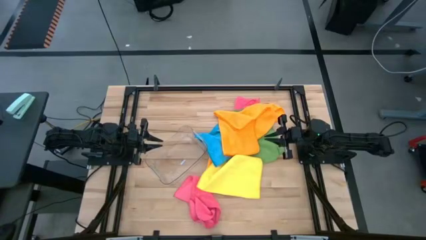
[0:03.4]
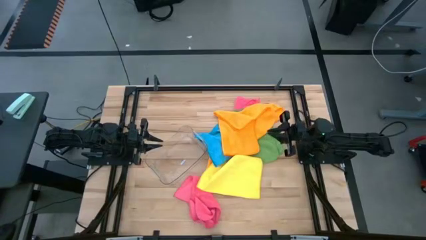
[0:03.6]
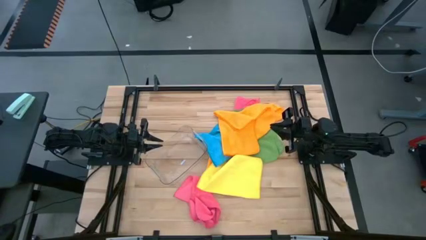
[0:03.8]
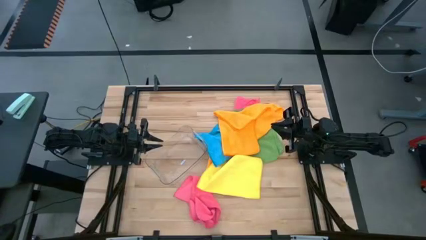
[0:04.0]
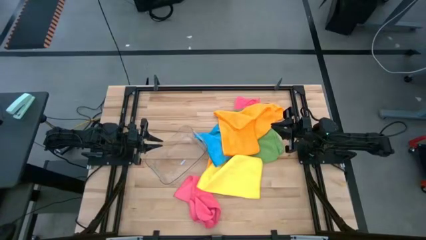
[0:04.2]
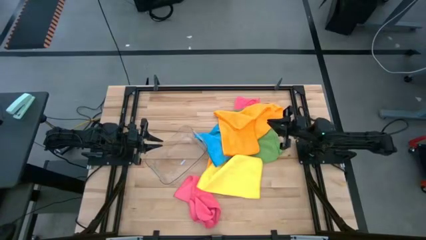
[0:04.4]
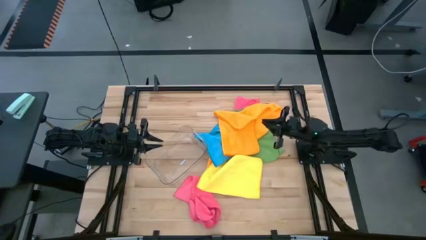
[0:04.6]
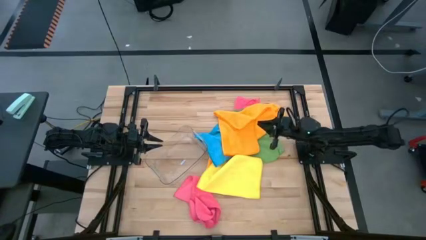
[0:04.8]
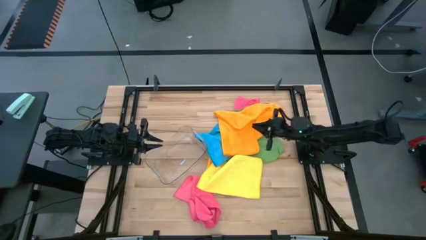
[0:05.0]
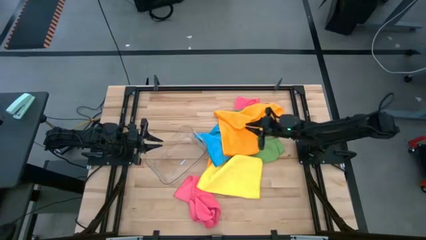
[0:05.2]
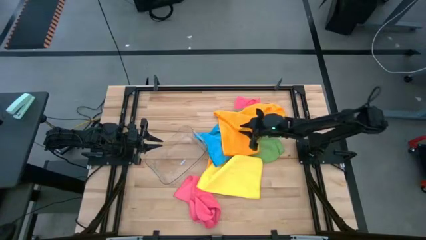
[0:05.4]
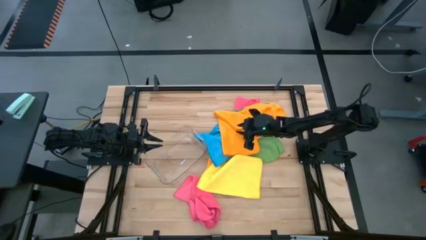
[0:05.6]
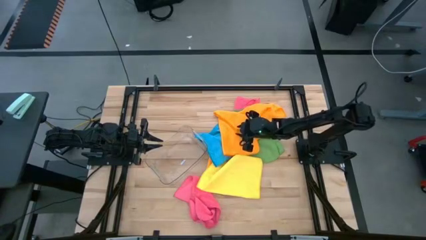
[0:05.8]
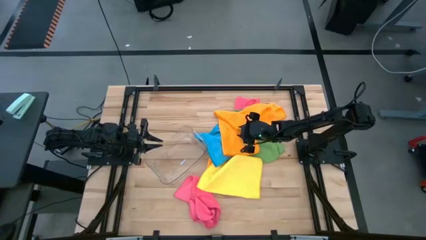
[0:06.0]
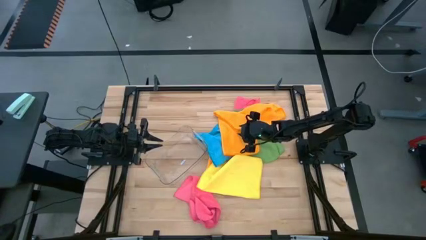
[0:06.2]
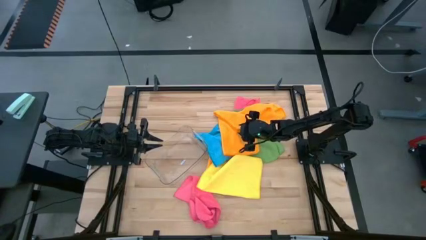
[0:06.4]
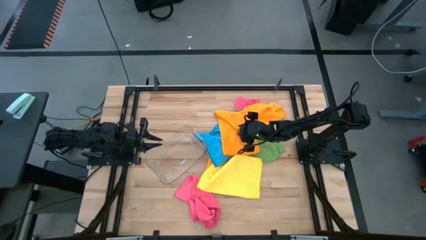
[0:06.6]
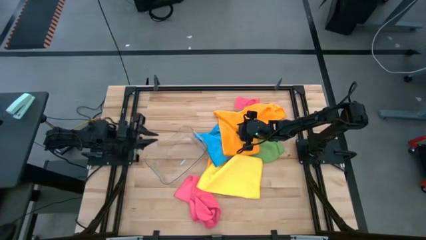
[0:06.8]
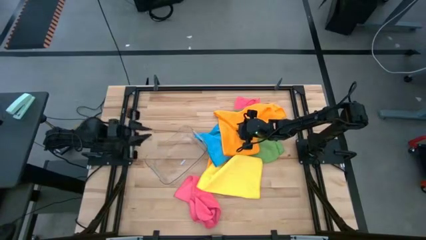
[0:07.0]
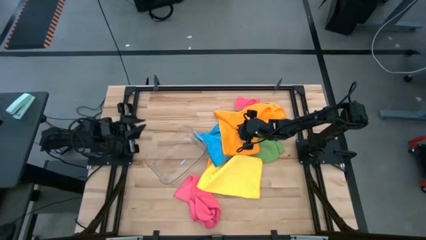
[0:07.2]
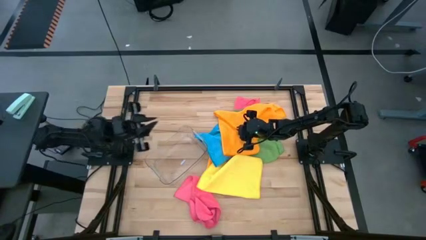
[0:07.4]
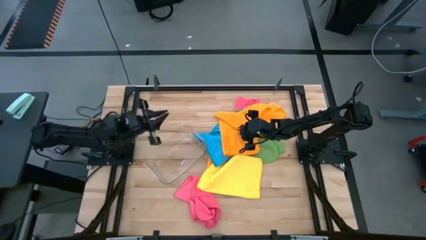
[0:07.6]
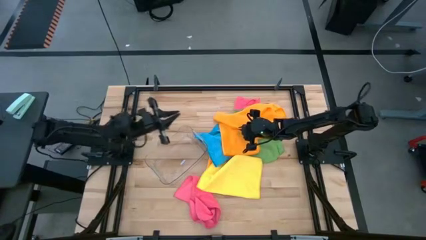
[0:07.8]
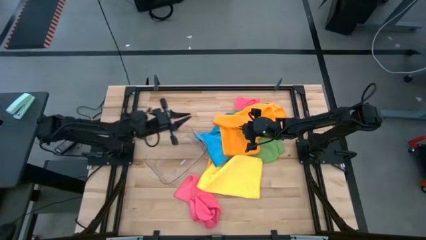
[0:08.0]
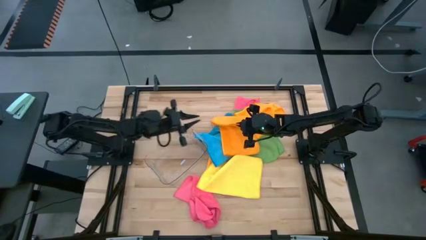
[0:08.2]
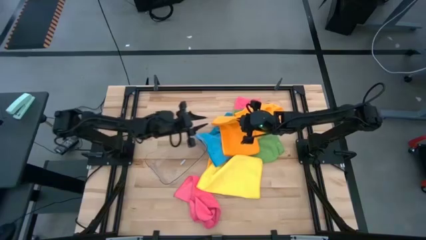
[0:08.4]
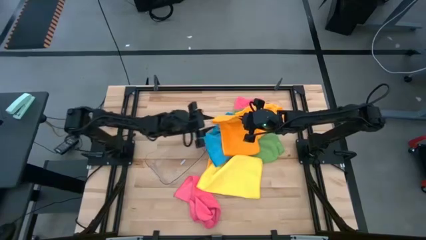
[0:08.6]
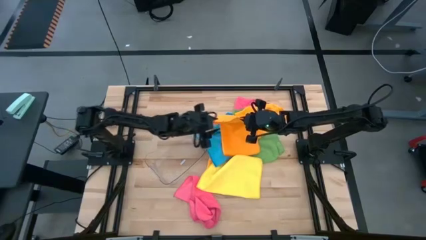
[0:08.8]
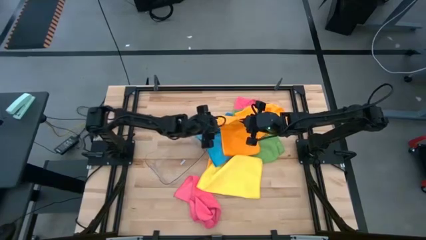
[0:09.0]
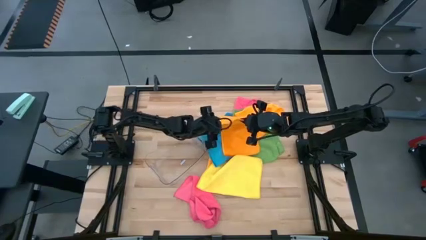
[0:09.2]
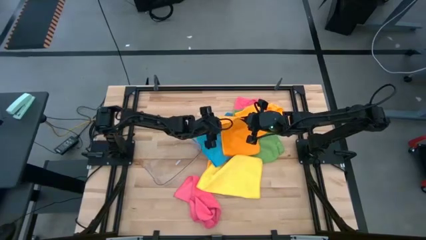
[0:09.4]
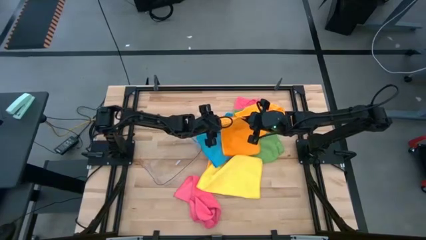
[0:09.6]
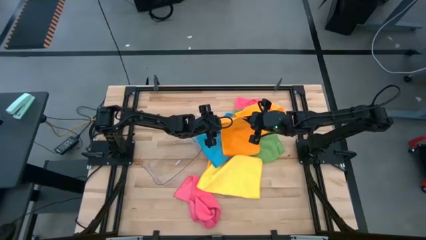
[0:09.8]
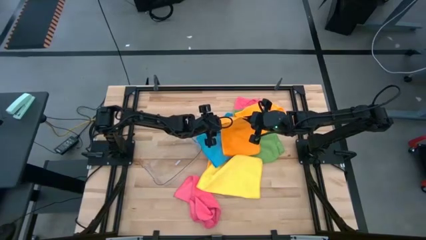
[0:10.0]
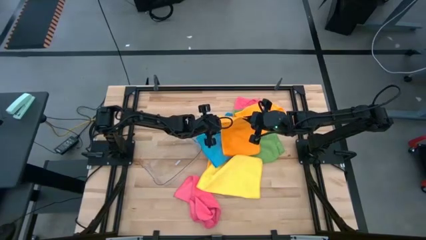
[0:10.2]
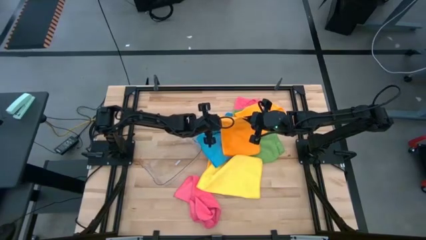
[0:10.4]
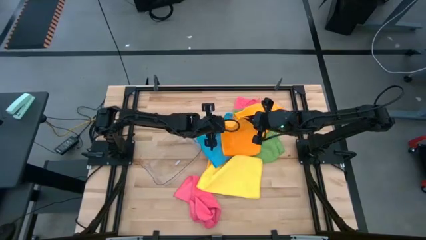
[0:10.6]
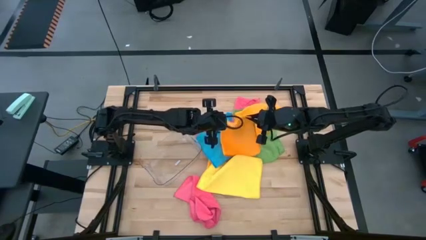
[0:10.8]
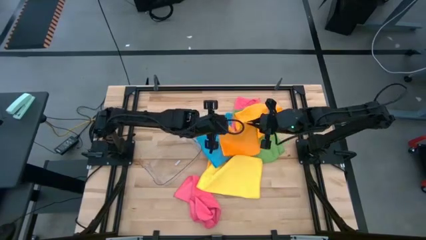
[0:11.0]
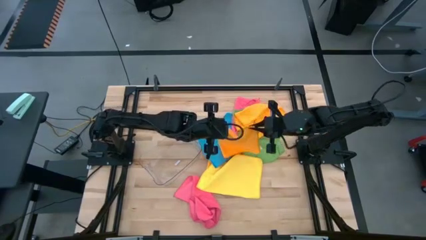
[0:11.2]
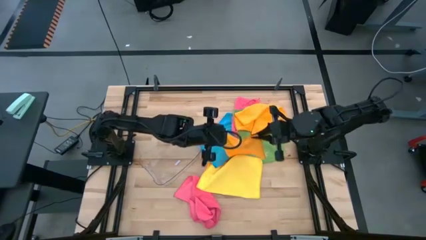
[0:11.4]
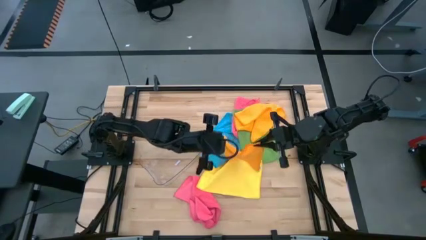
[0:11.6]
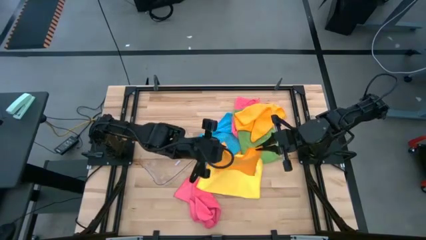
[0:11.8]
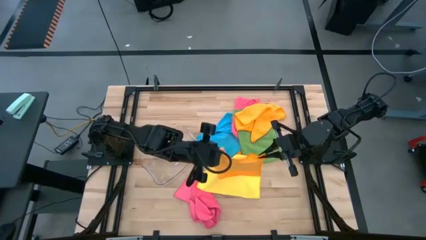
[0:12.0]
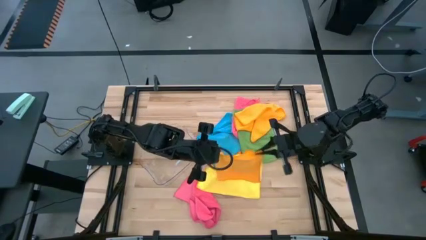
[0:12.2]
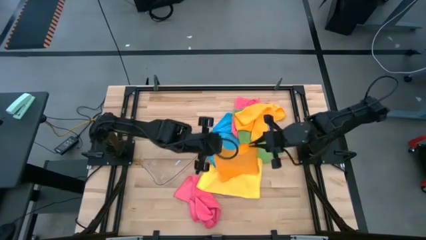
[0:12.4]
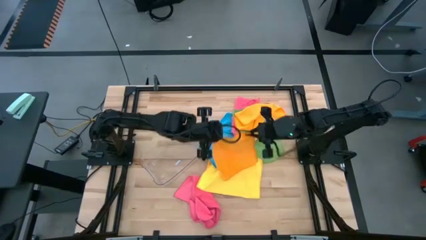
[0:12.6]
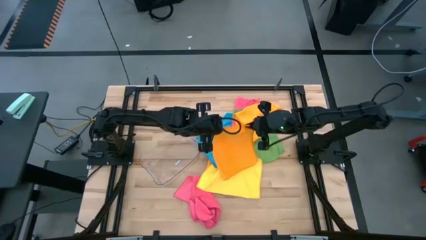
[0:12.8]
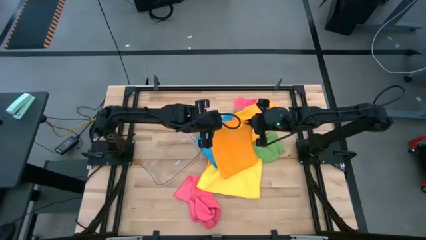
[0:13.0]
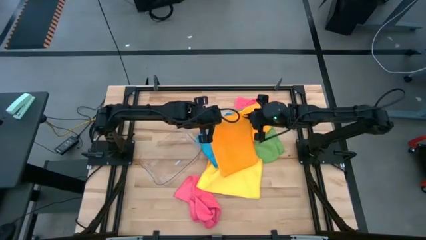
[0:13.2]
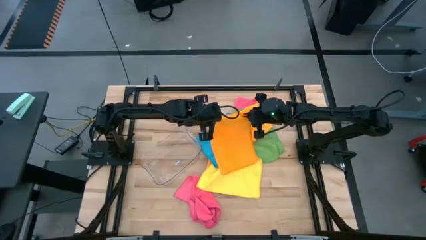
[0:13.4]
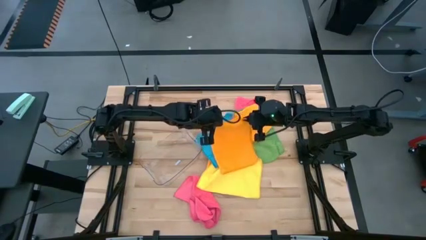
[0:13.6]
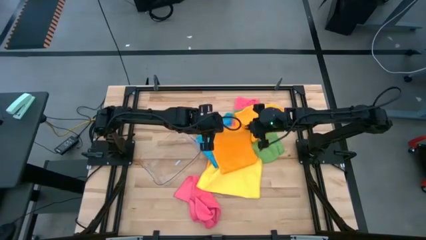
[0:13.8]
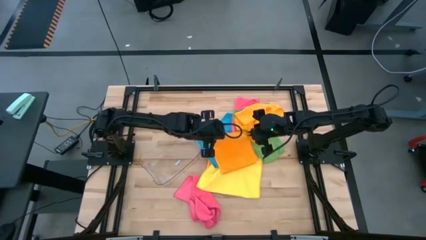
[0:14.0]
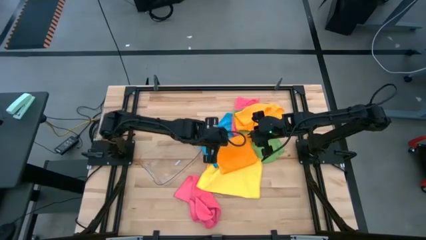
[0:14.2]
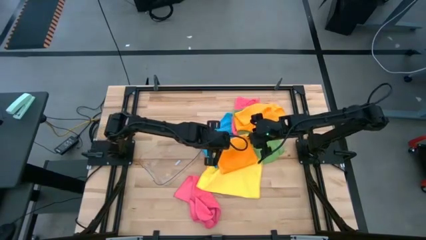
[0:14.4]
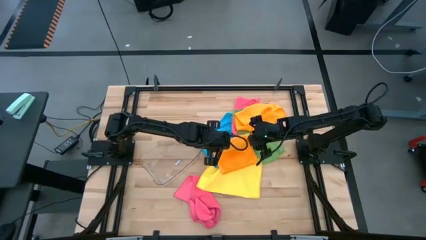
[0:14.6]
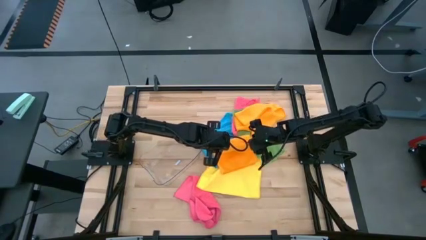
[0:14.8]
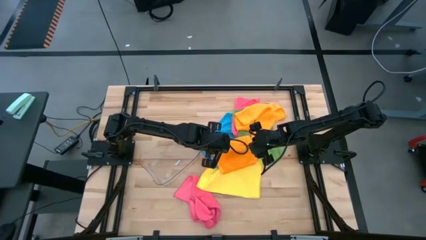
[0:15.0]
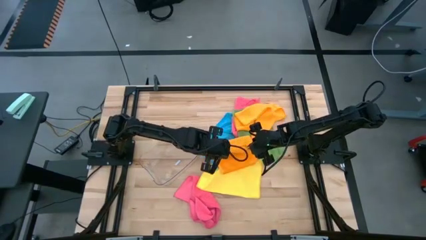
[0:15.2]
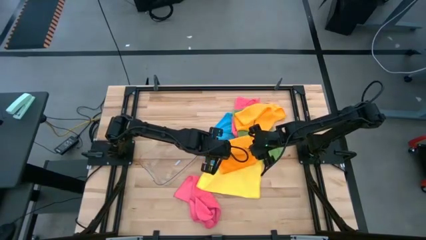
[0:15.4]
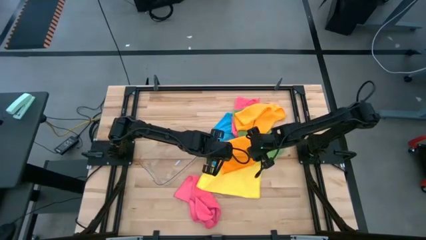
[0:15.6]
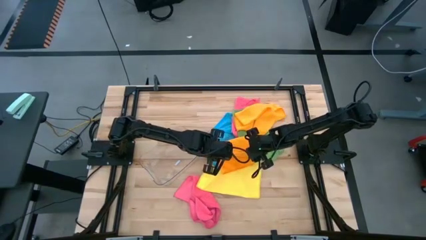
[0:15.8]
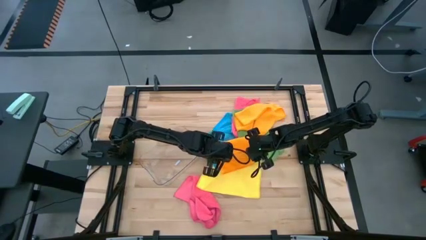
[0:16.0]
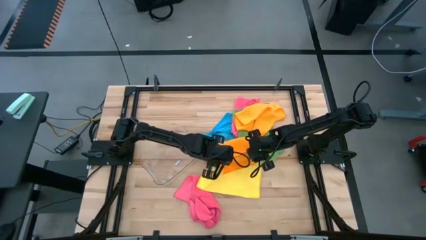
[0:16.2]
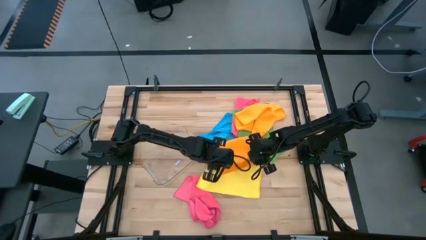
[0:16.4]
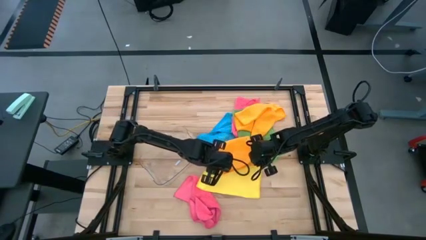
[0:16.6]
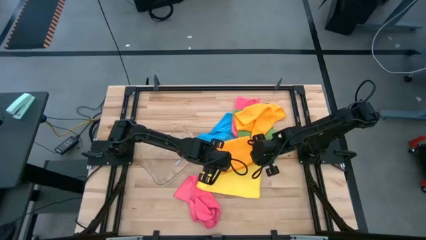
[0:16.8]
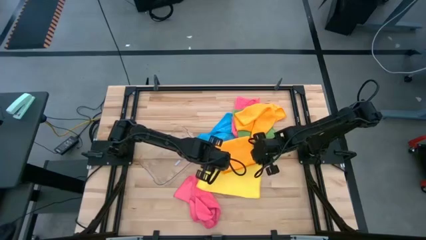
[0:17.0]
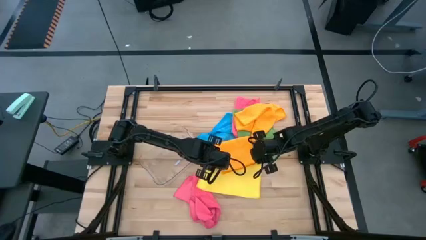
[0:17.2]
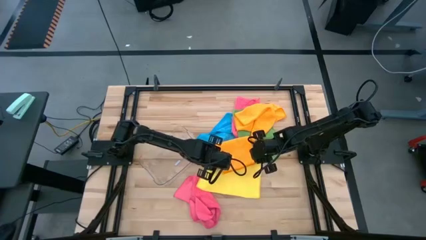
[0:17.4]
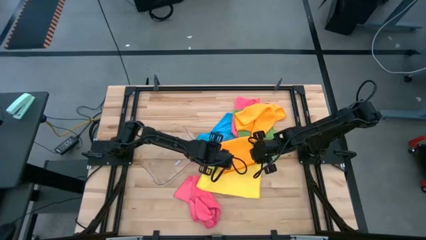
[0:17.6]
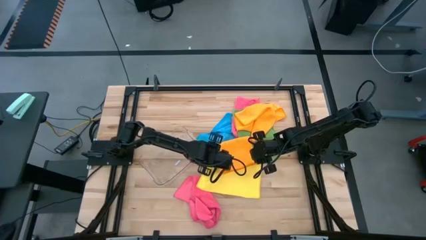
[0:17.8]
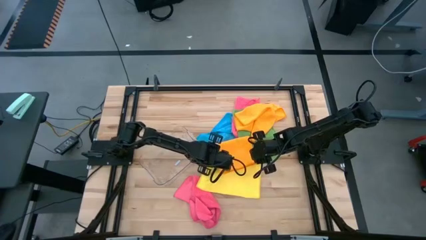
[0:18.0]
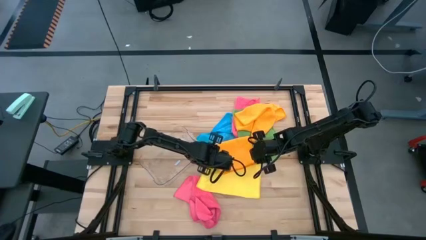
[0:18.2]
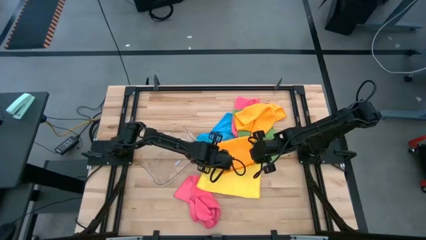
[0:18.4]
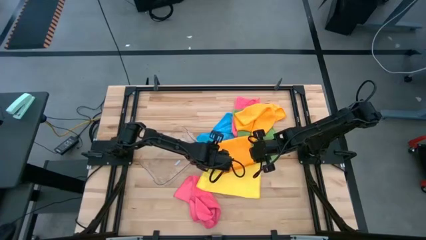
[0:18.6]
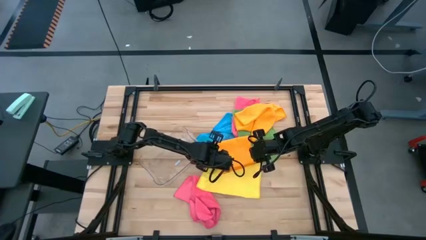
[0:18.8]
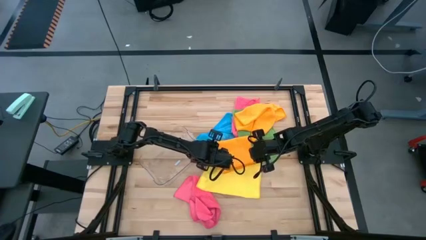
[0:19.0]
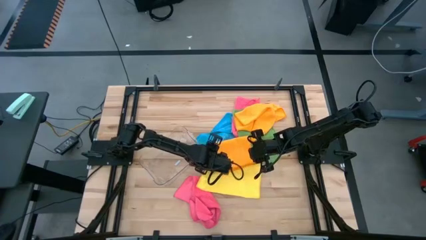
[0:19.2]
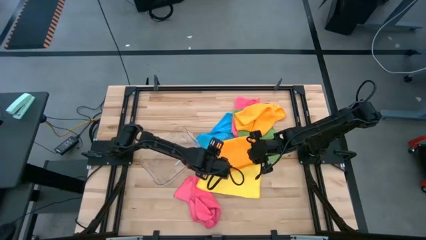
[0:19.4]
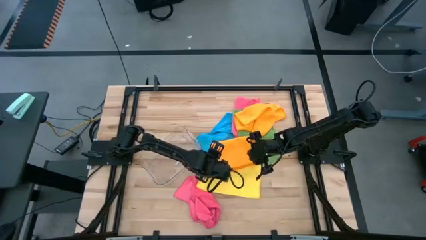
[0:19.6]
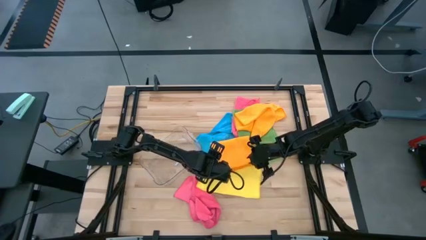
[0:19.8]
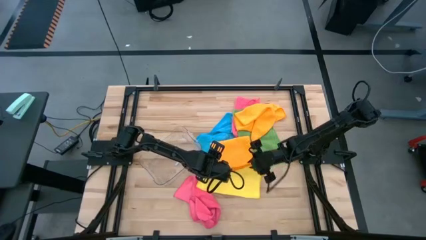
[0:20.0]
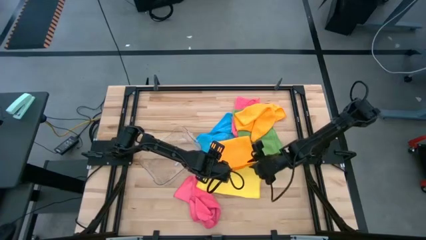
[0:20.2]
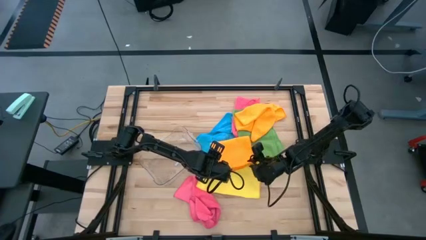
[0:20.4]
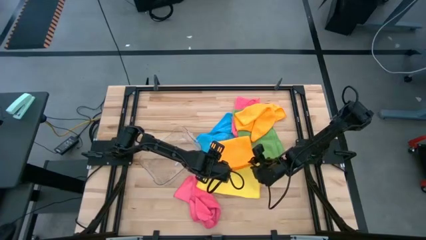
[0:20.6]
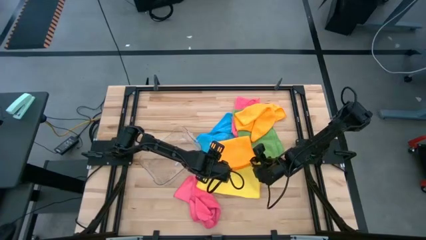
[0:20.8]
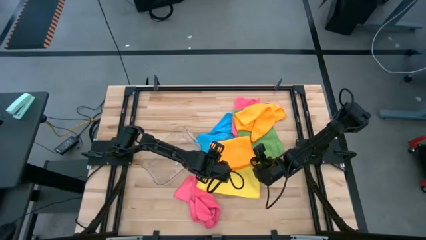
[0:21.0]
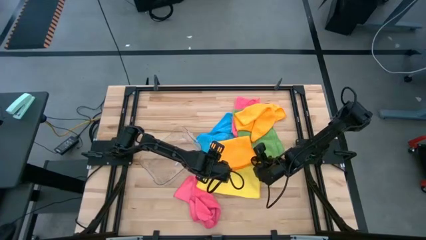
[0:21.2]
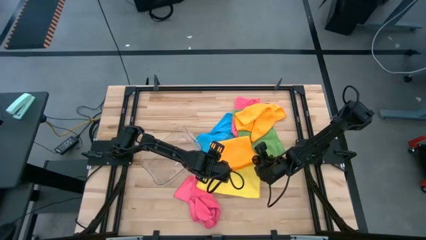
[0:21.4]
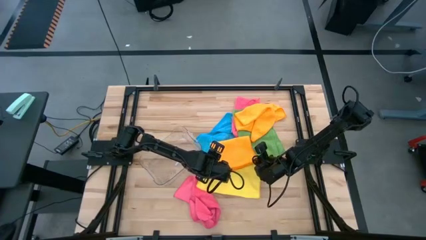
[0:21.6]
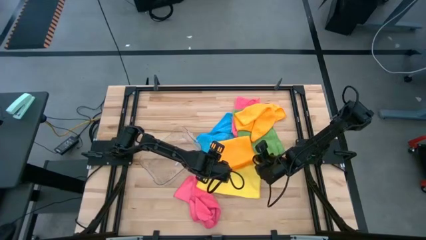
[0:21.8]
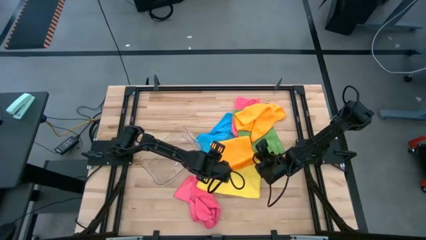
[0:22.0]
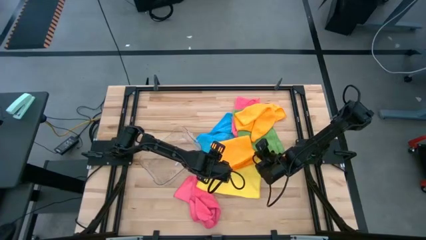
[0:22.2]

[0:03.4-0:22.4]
Task: Fold microfiber towels
Fold the left orange microfiber cloth
